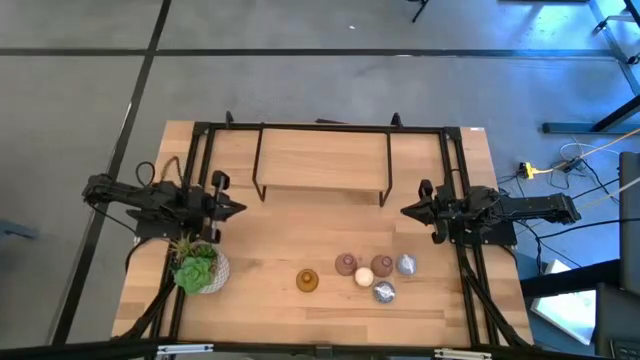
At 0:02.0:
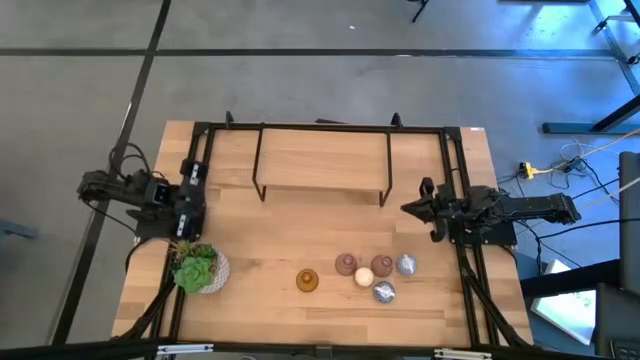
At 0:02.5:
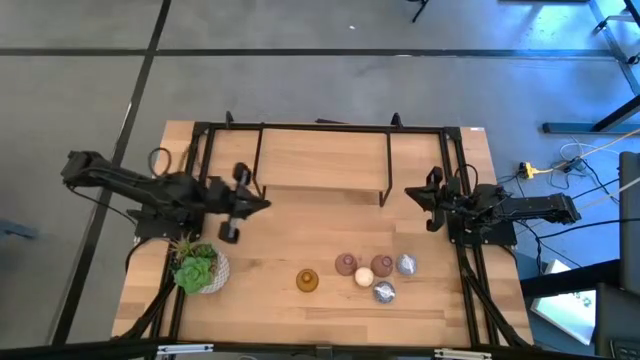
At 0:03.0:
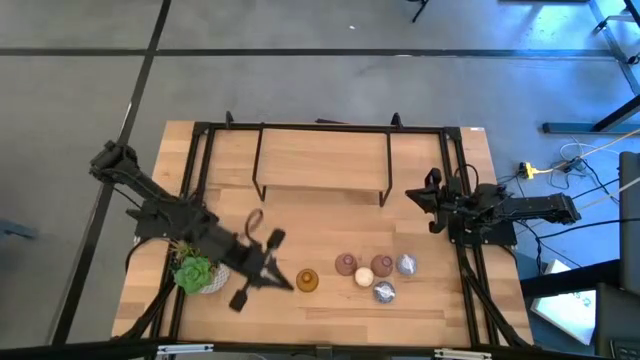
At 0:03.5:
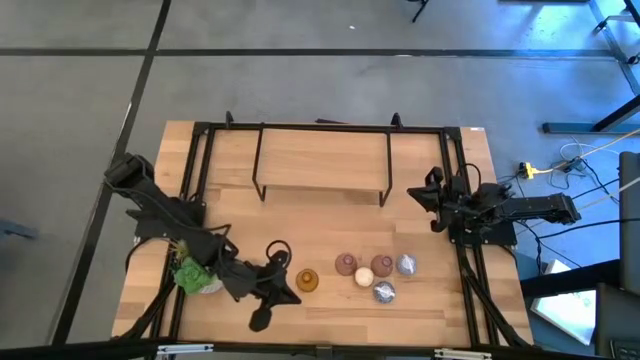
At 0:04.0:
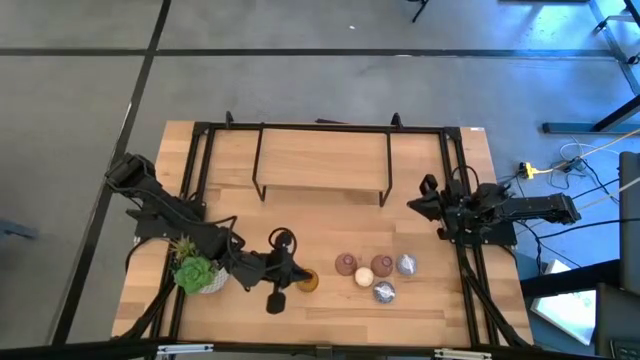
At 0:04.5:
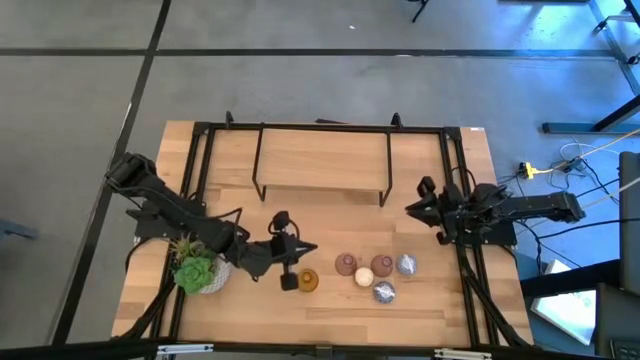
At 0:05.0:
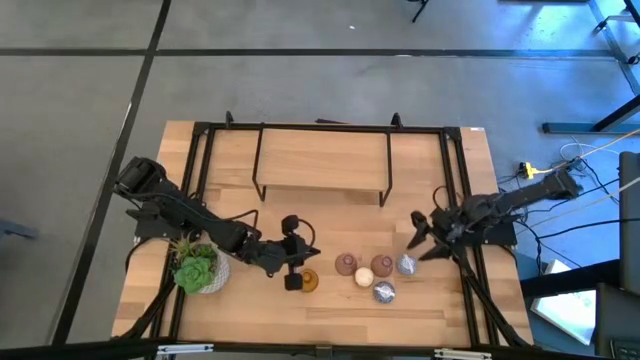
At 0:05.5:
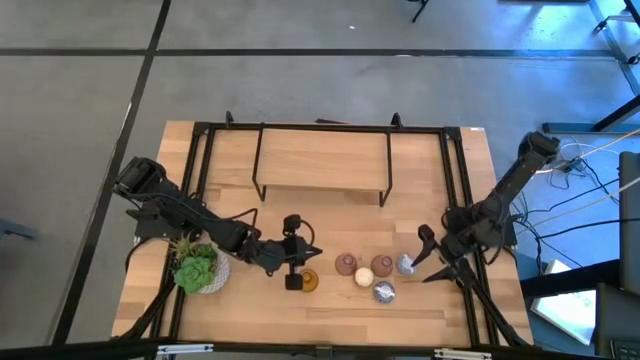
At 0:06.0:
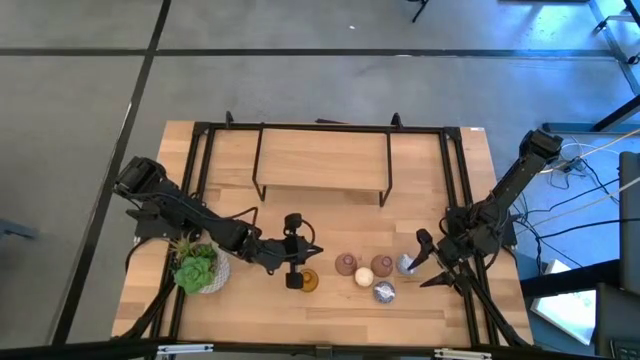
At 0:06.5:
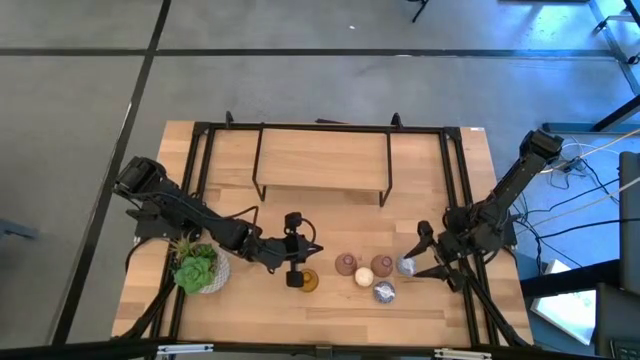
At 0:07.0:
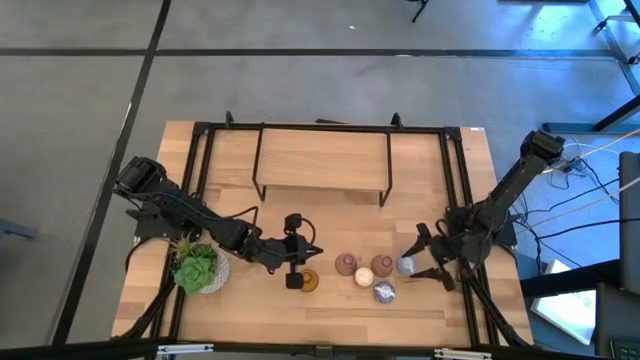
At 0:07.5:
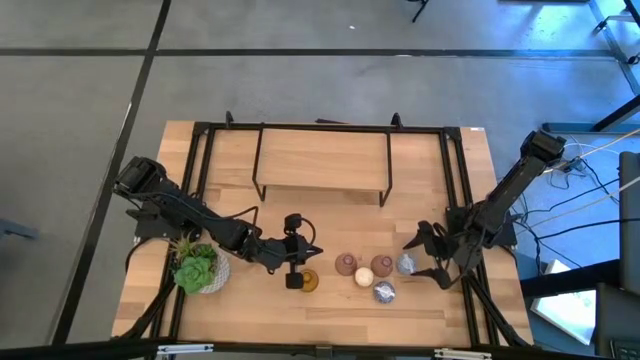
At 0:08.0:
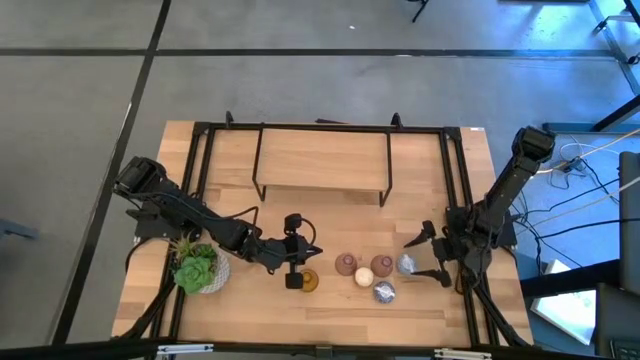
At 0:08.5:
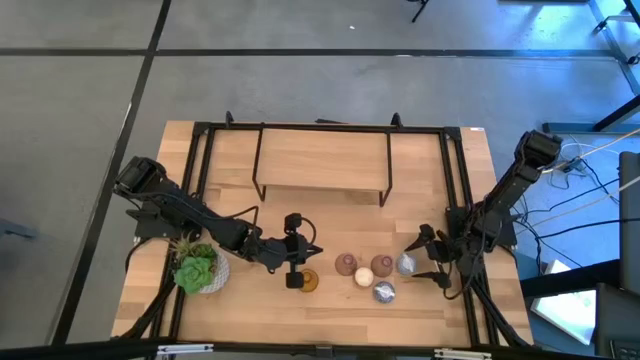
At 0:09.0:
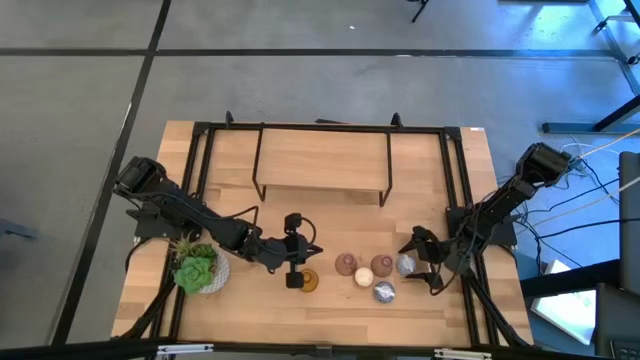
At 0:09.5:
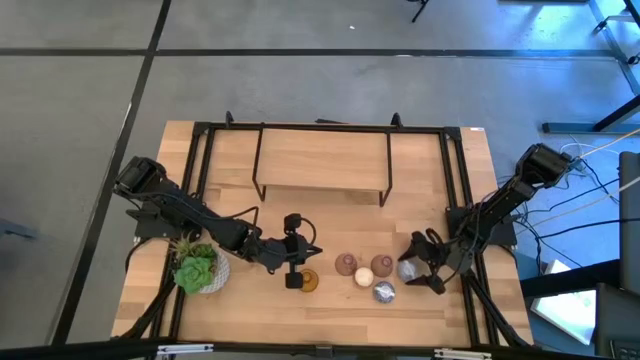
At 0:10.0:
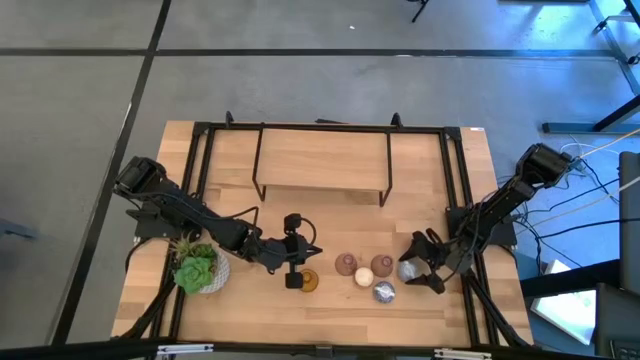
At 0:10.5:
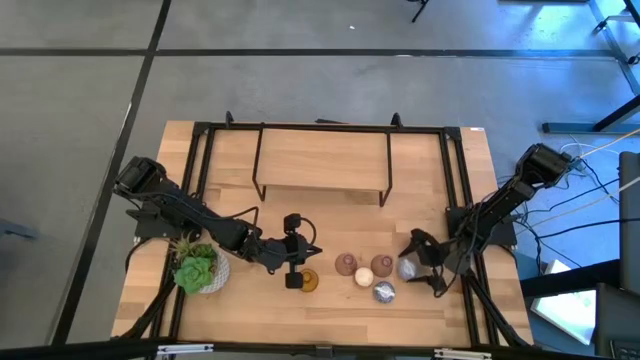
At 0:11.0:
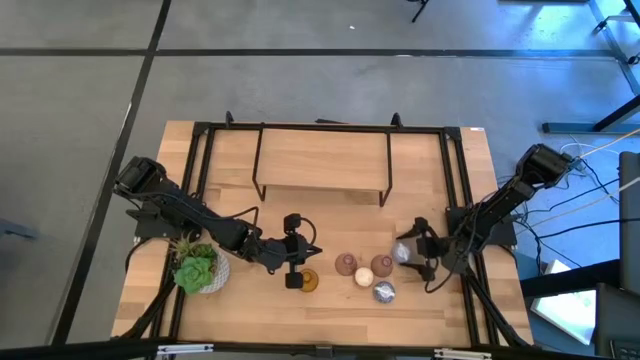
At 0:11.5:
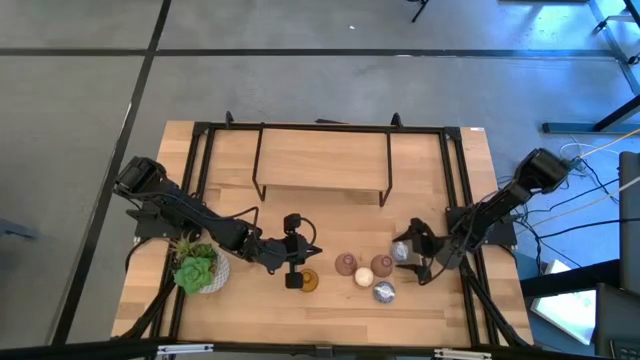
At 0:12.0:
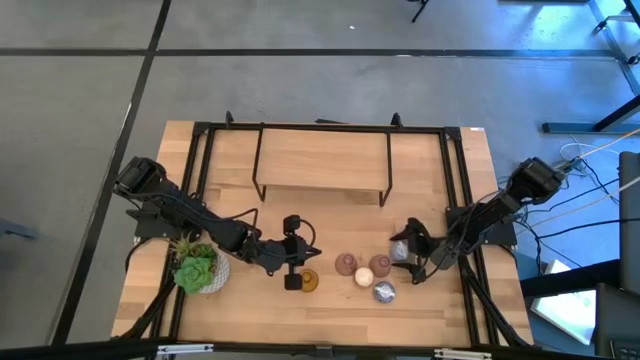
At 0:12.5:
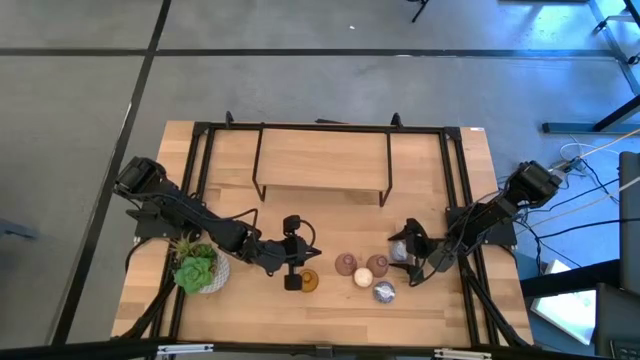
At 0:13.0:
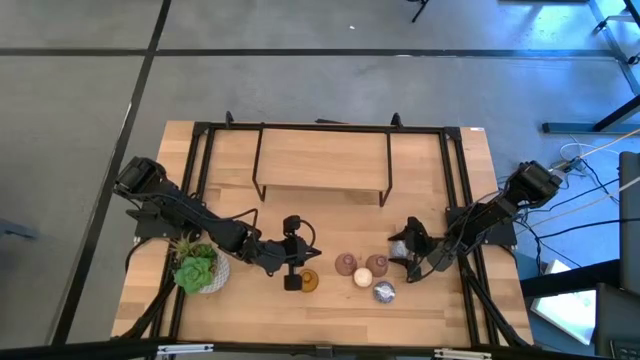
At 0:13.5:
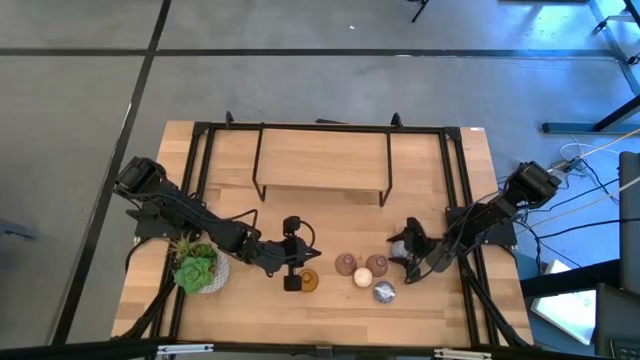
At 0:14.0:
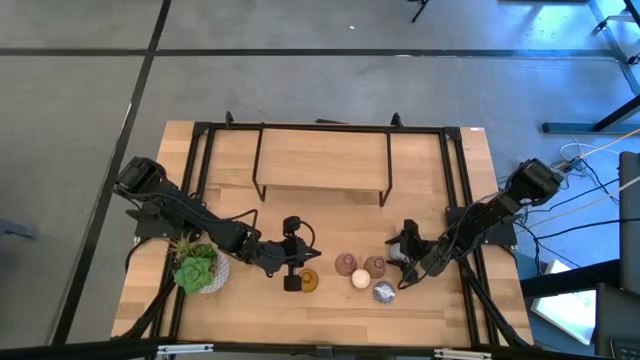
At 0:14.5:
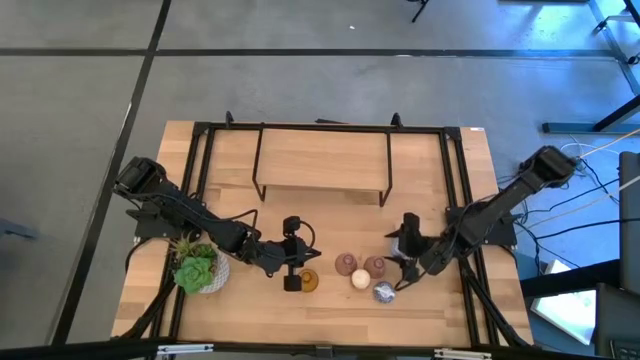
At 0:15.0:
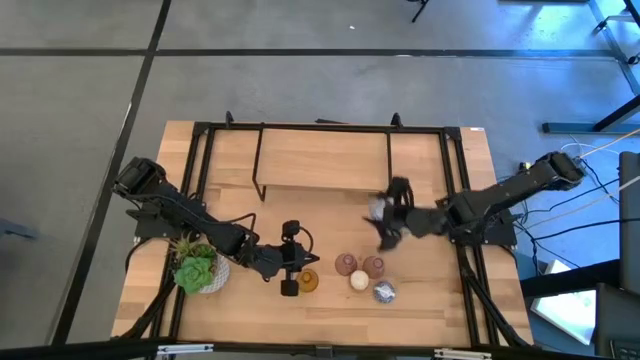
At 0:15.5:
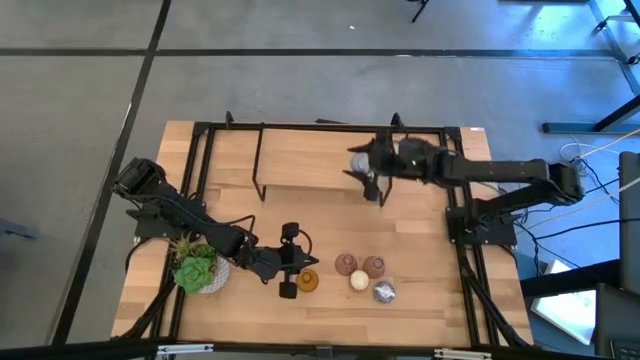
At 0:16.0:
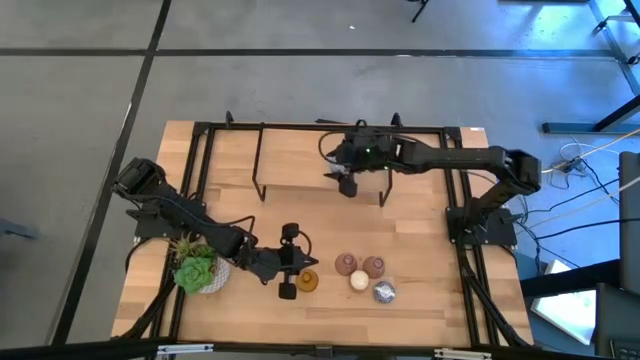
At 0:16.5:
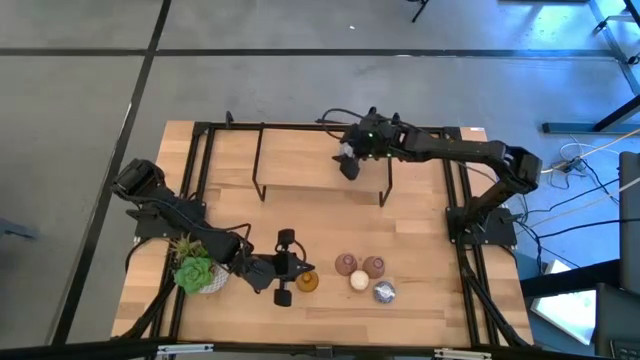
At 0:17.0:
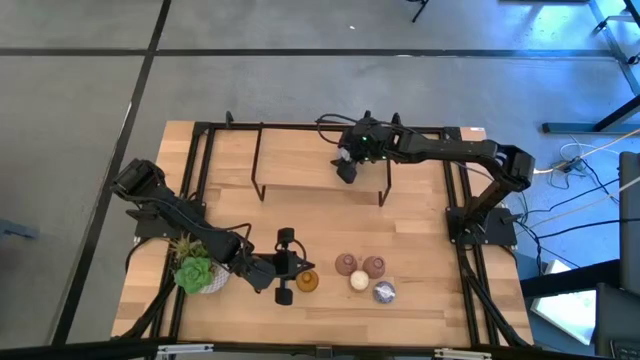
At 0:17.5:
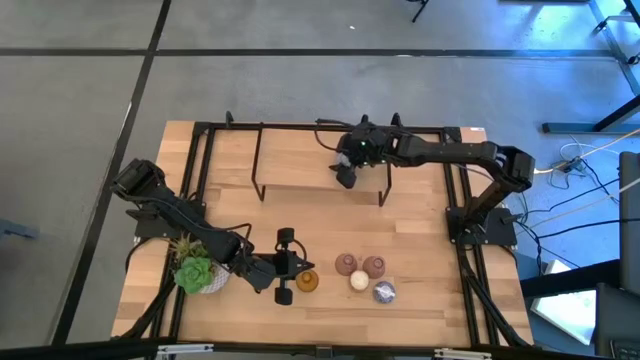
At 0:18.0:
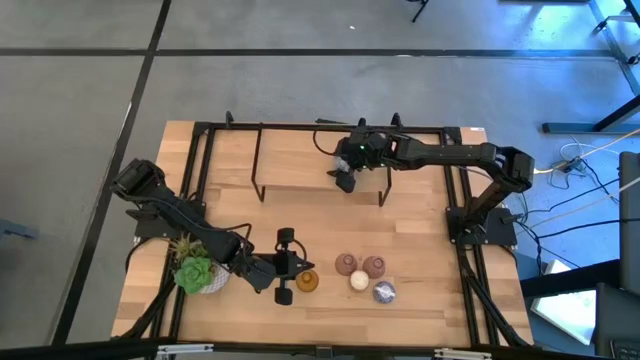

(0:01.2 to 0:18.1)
Task: Pick & Place candle stick holders
Put the light blue scented candle on the shelf

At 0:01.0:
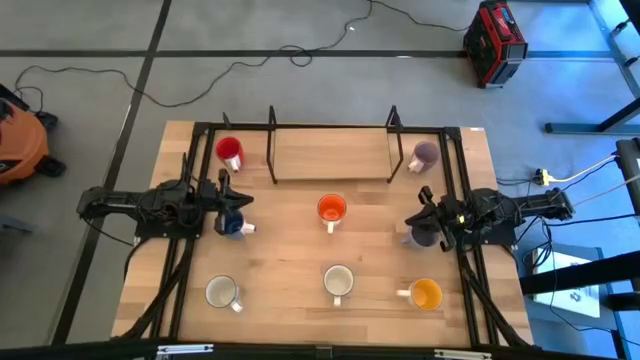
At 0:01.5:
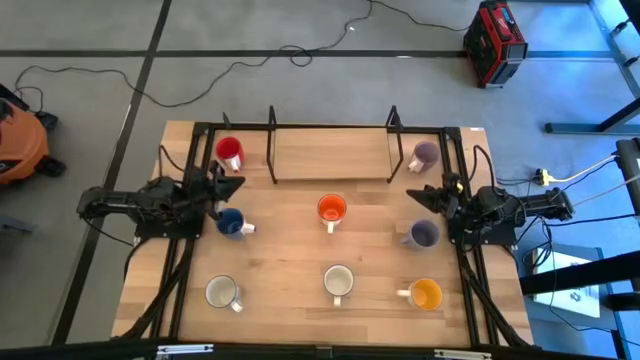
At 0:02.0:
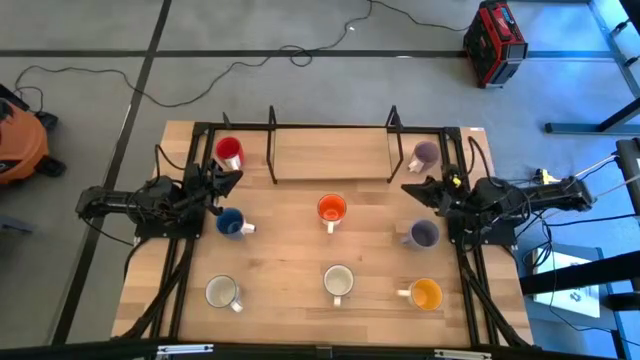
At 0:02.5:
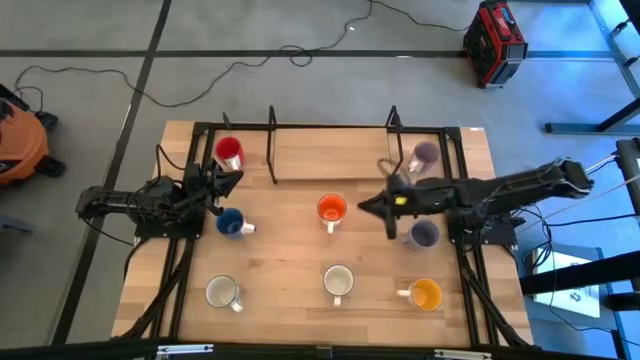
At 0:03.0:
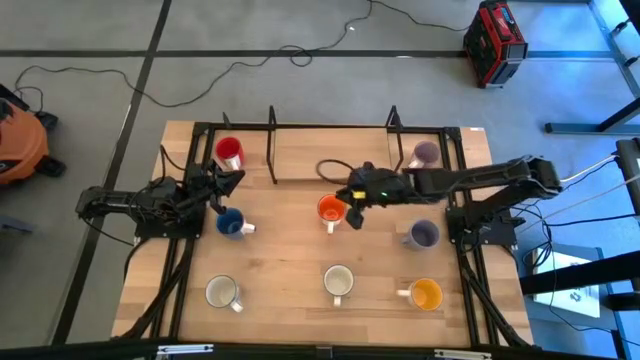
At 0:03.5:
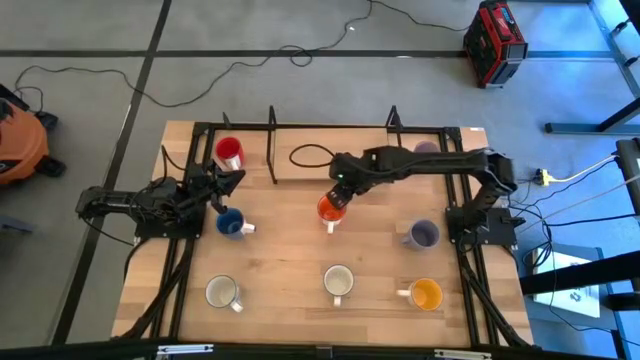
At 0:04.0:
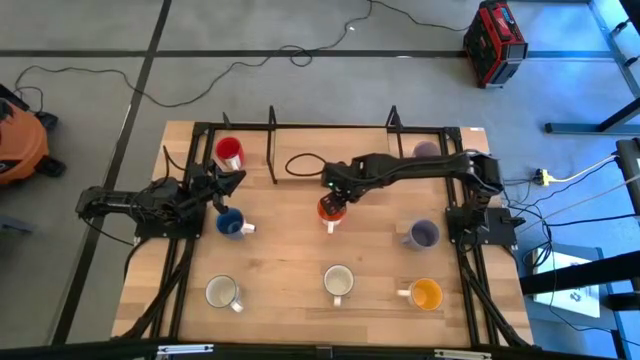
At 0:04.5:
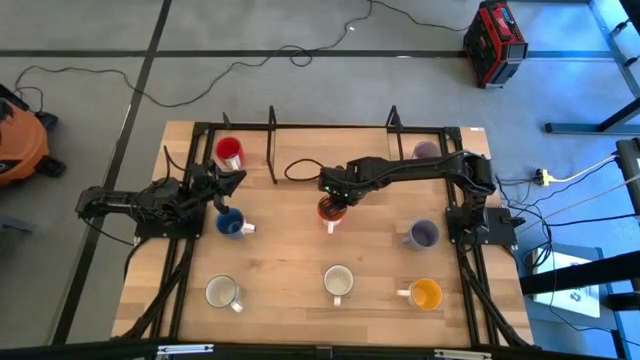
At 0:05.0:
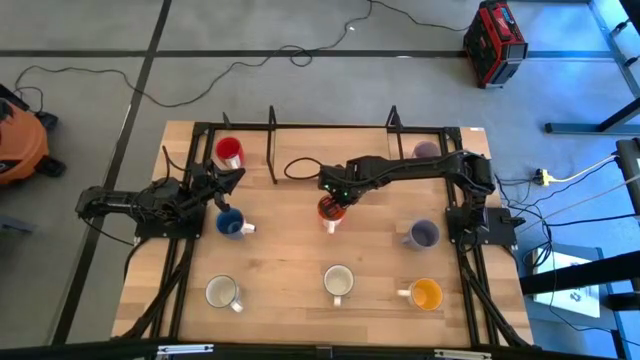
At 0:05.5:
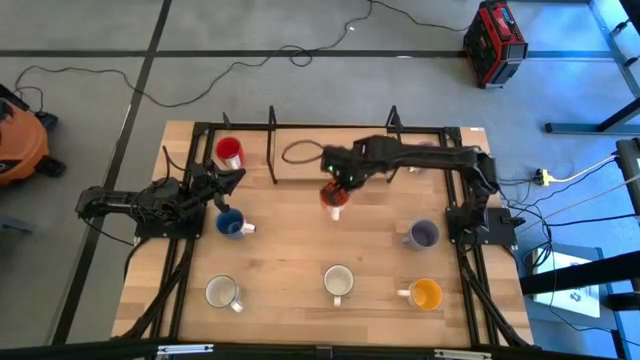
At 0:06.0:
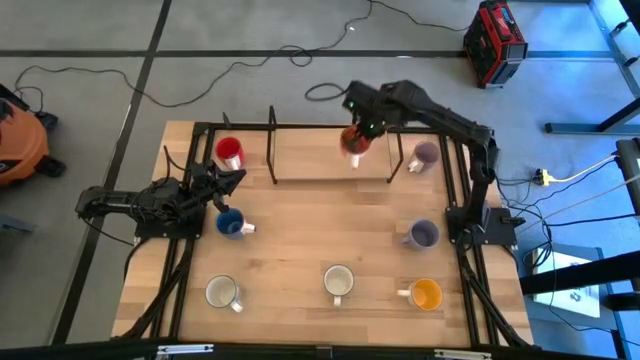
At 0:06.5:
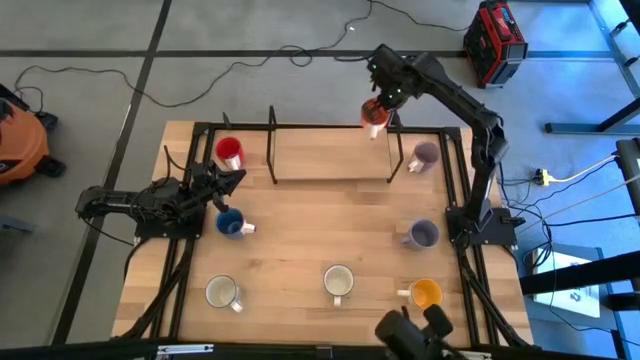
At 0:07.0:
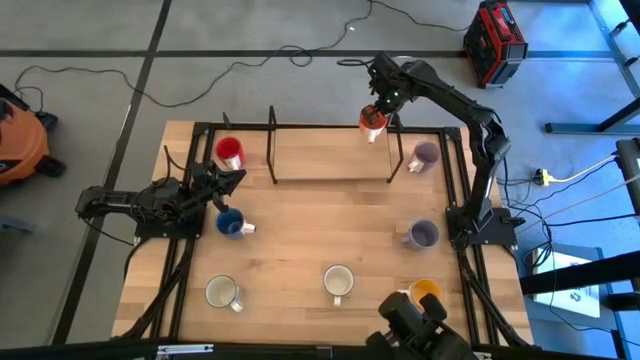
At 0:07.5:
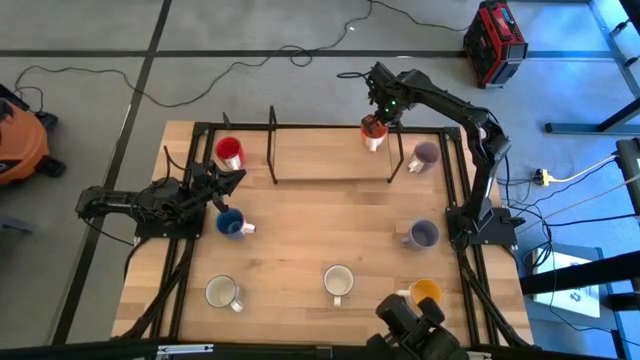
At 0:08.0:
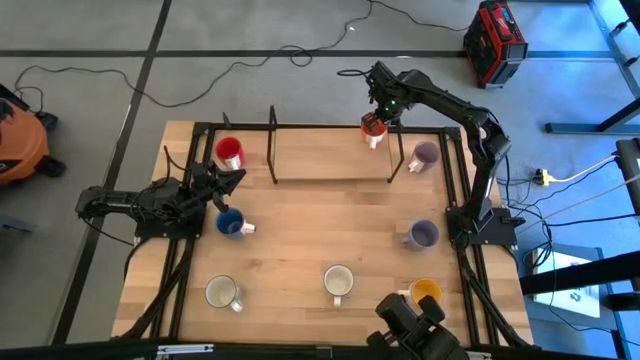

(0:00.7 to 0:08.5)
Task: Place coffee mugs
Put the orange mug on the shelf
